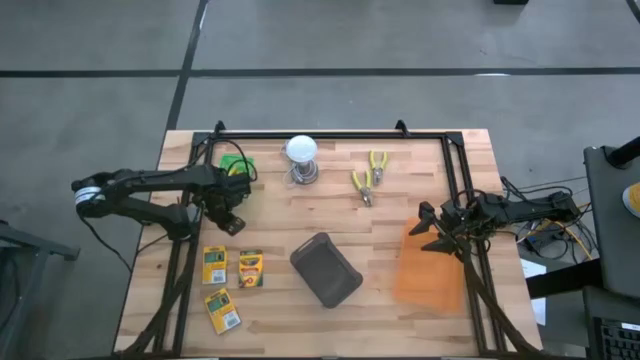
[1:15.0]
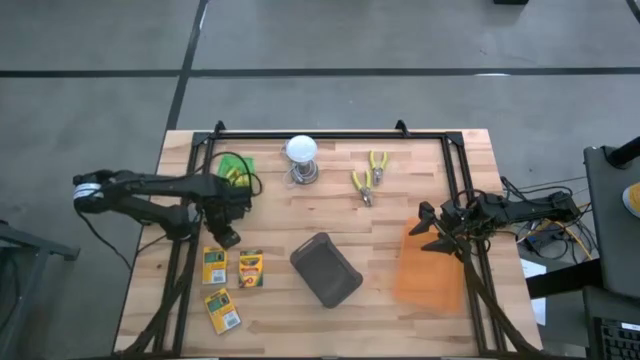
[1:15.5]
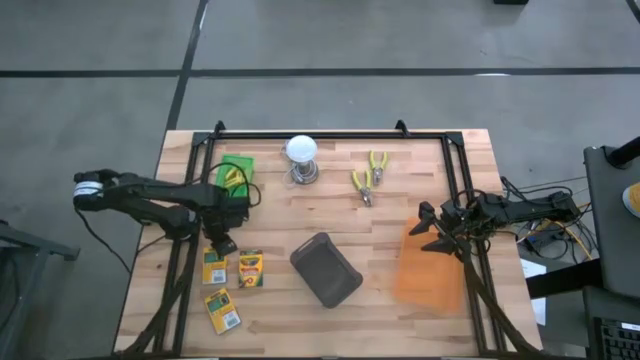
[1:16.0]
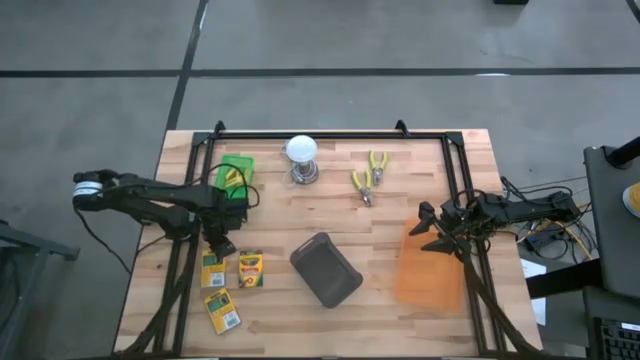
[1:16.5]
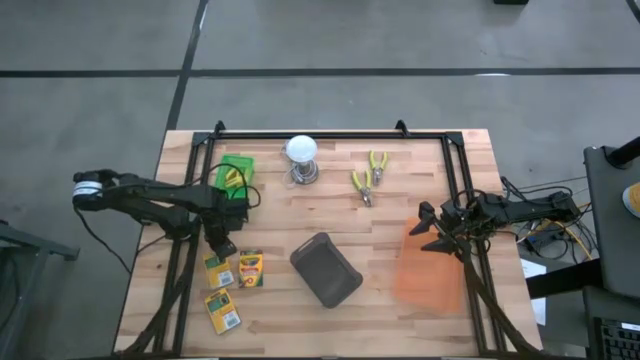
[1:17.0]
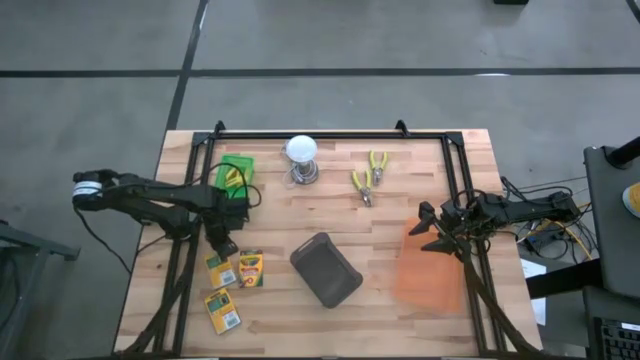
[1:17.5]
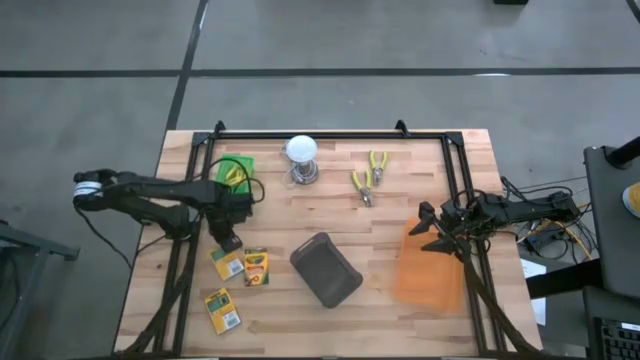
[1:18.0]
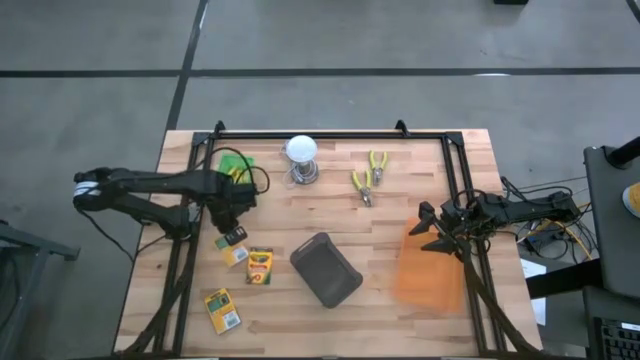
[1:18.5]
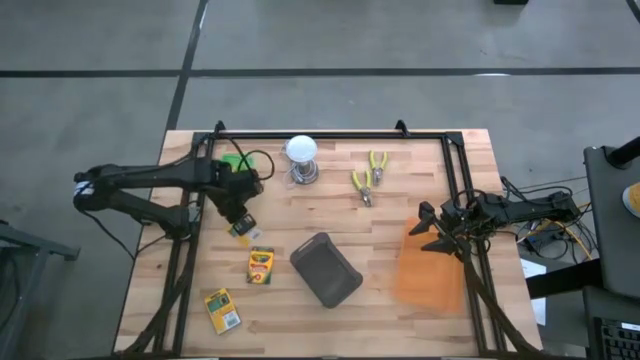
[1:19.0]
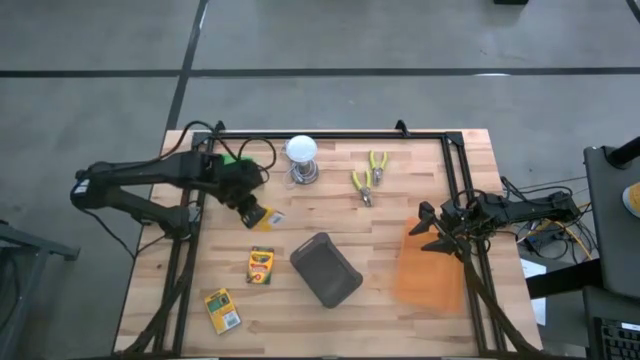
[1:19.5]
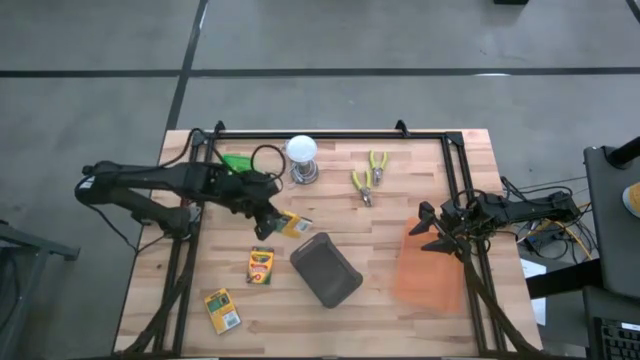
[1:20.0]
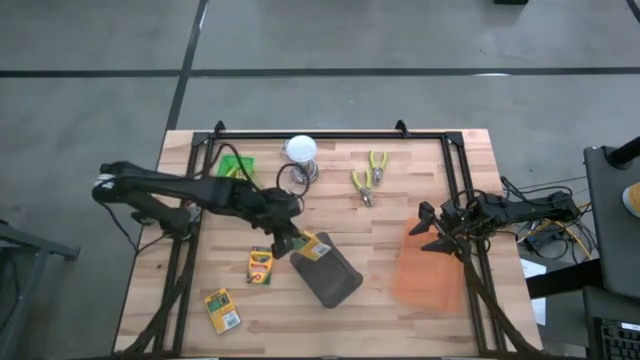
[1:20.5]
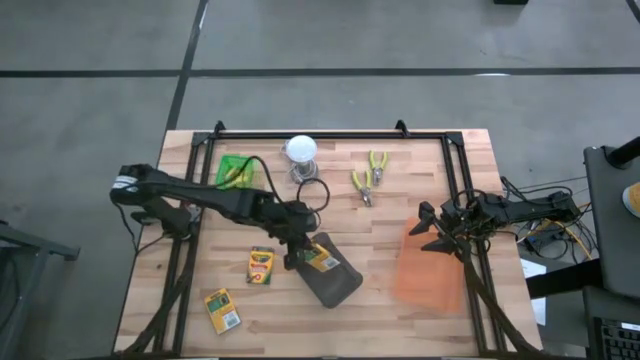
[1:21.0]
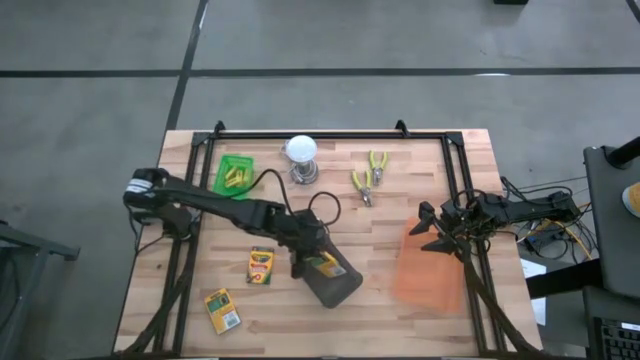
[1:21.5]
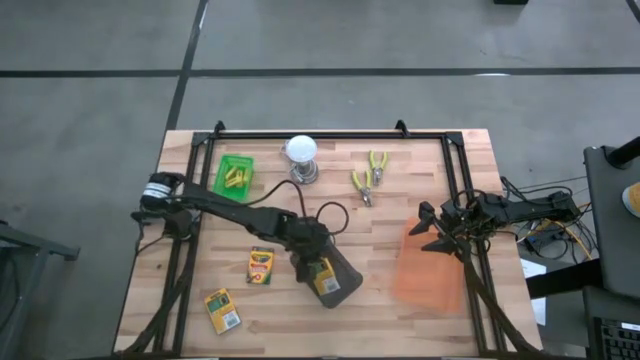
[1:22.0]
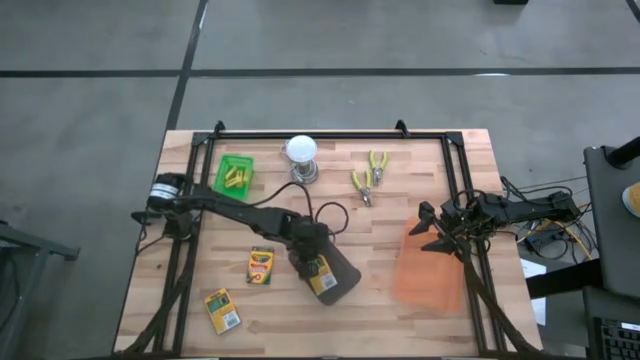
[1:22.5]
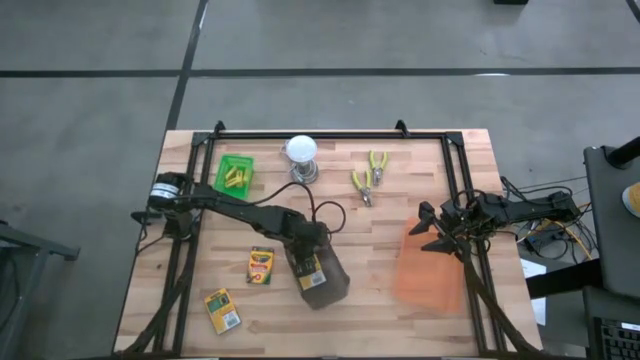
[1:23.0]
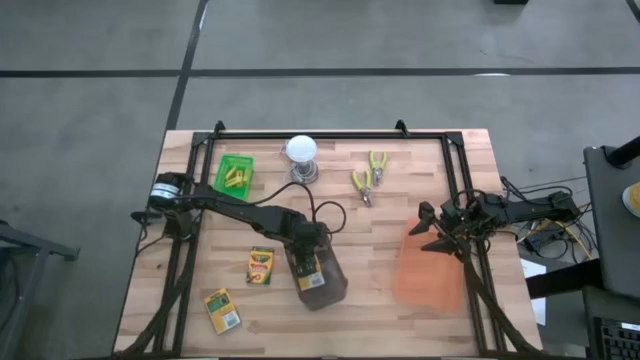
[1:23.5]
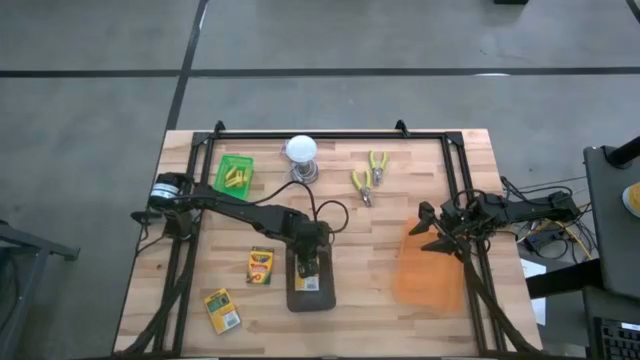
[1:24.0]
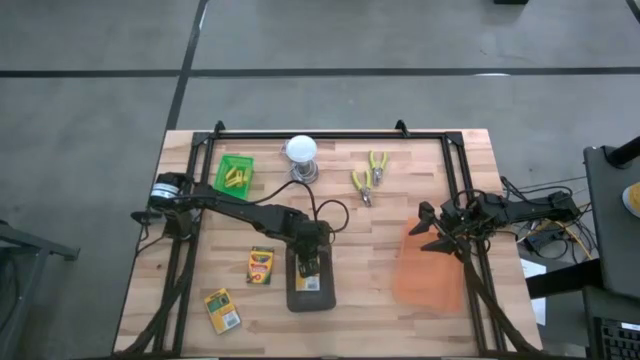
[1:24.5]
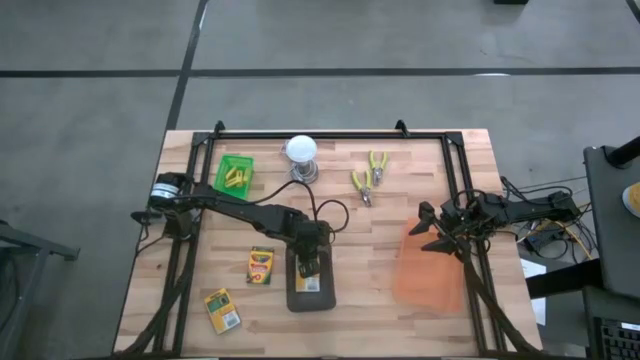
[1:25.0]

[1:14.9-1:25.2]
Task: Pick & Place School Supplies
Put the yellow crayon box into the black bin

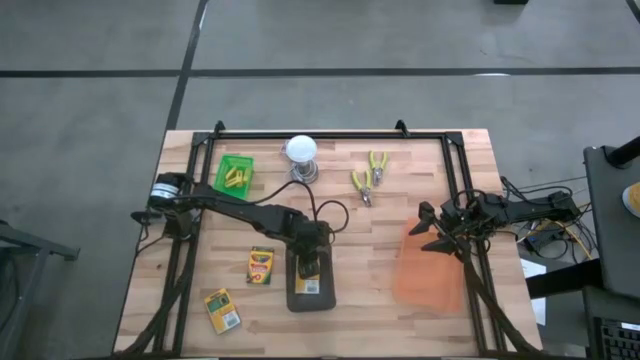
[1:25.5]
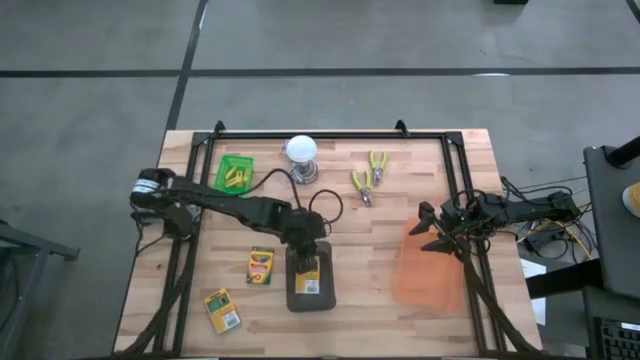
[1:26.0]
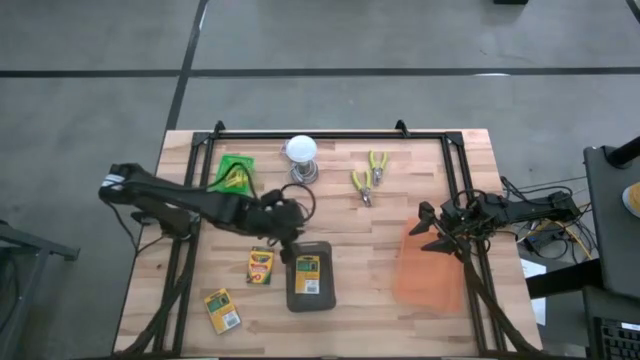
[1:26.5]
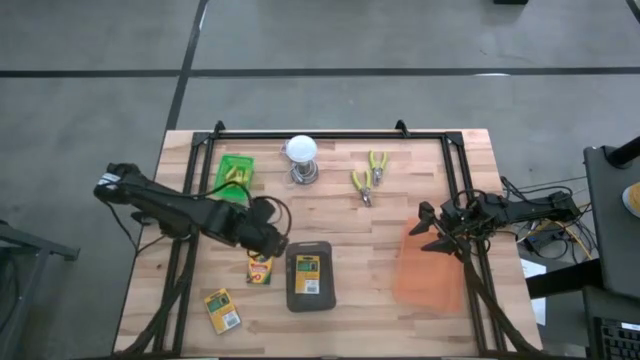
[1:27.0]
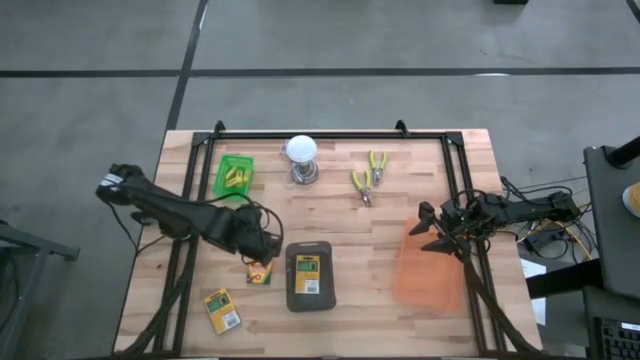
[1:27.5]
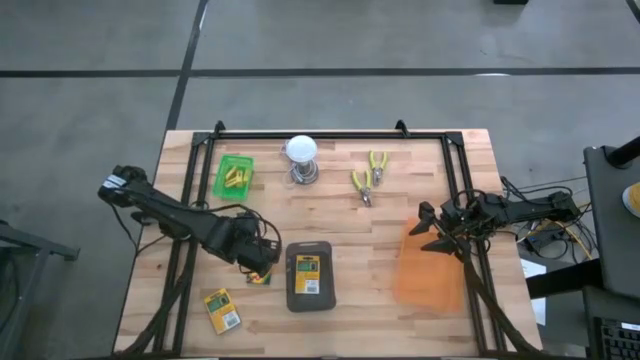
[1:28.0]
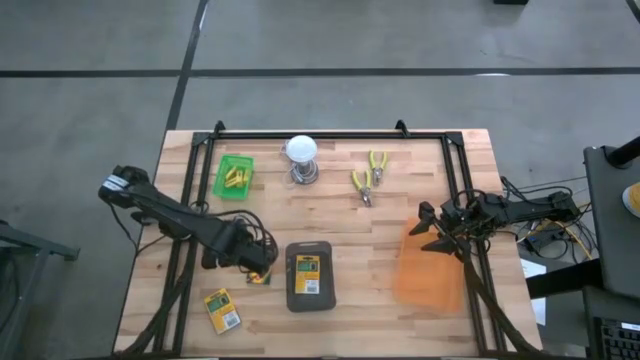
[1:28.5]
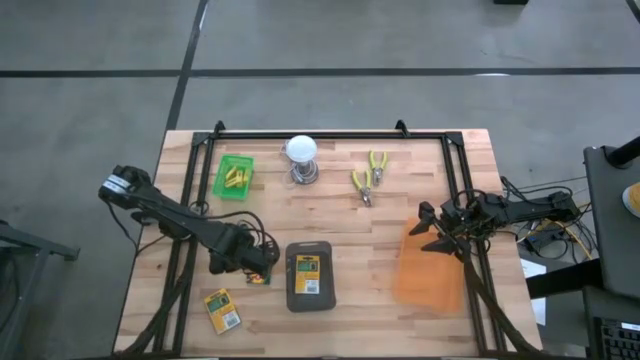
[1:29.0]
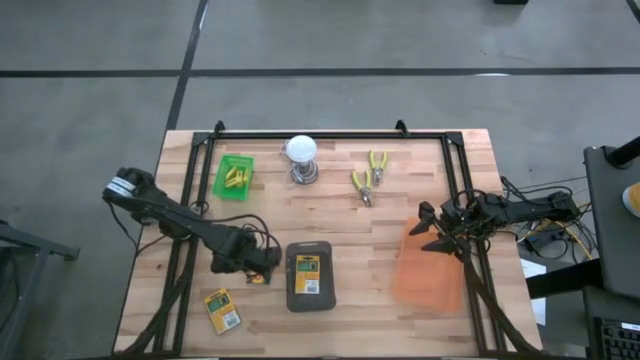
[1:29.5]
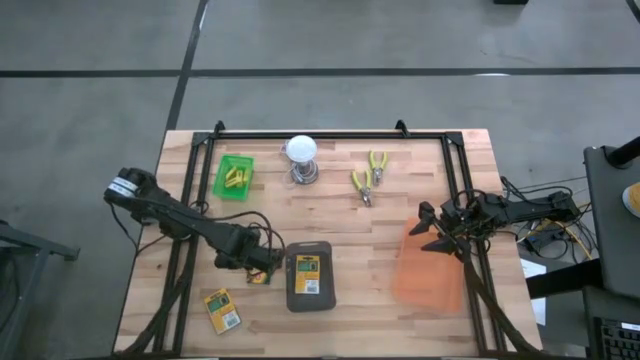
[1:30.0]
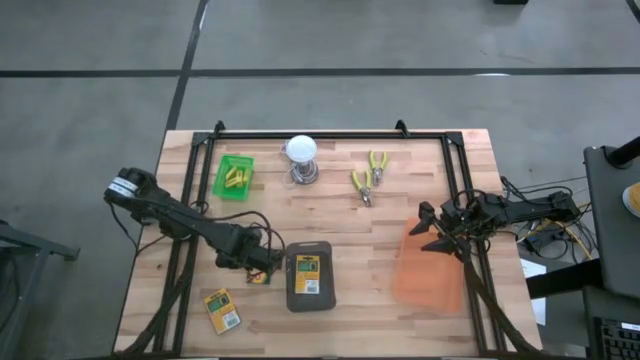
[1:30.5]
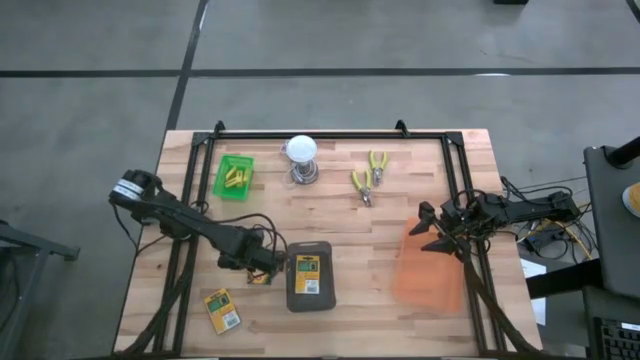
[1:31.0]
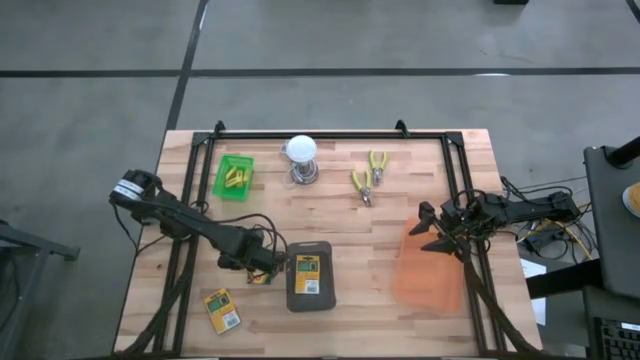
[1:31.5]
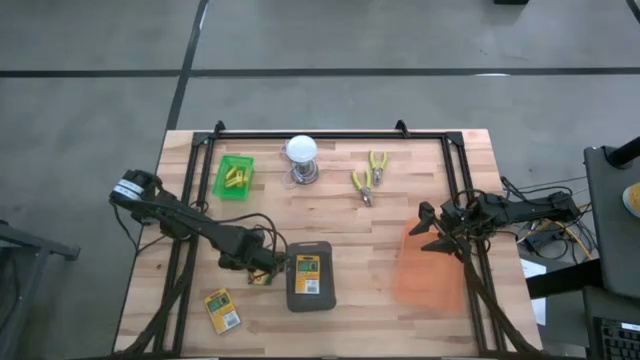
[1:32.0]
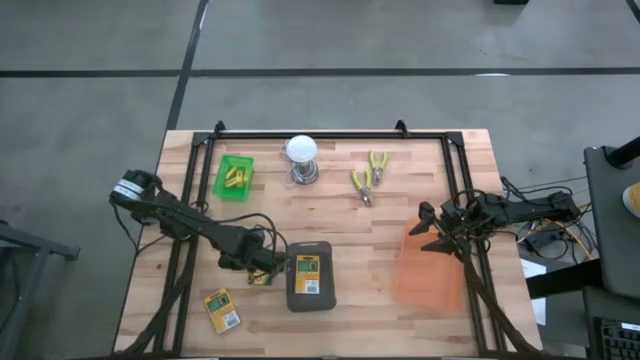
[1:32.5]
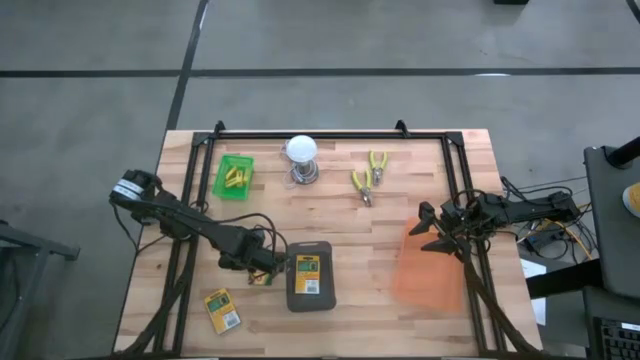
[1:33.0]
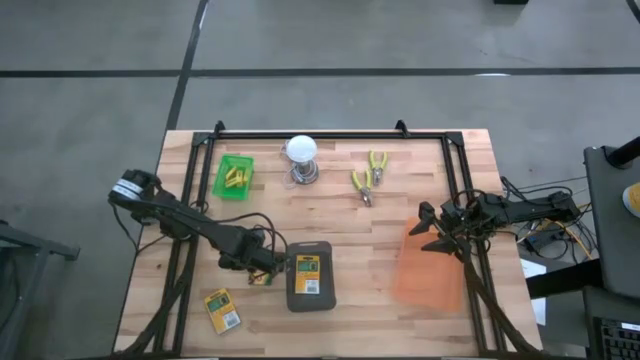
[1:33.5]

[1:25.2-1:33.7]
Put the yellow crayon box into the black bin

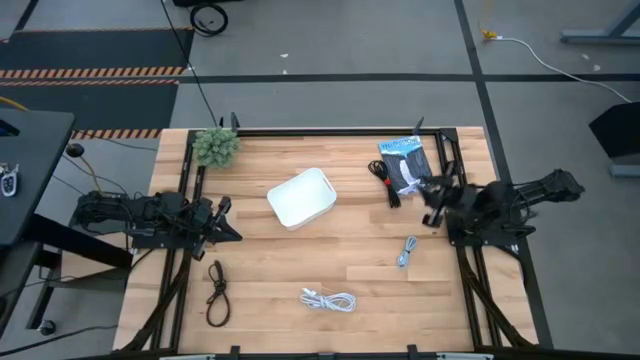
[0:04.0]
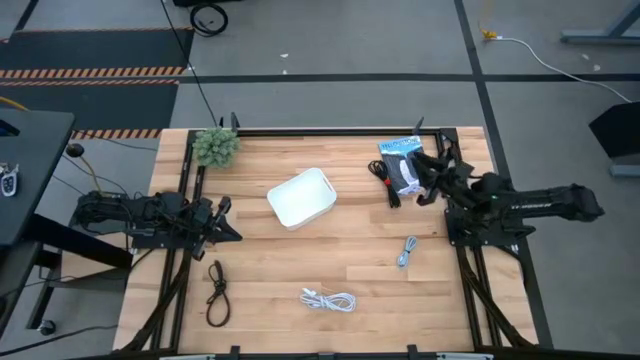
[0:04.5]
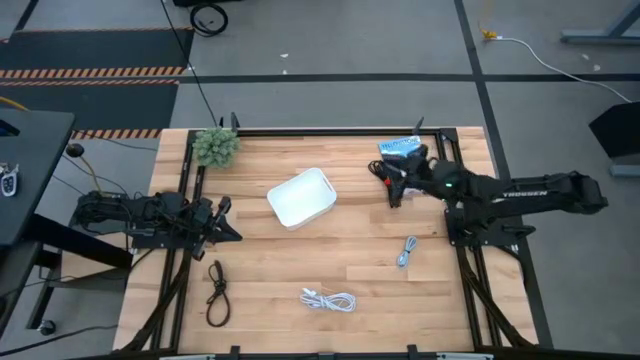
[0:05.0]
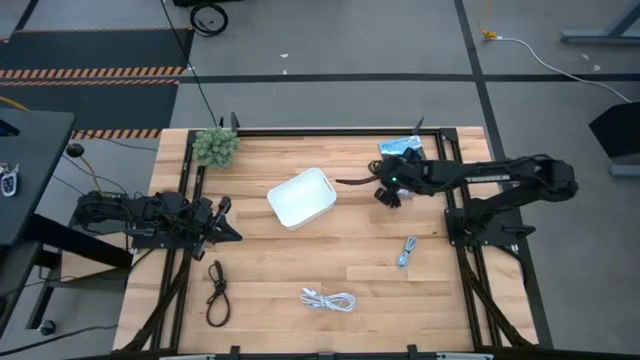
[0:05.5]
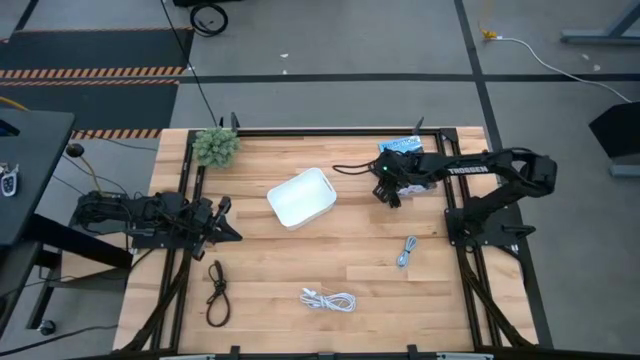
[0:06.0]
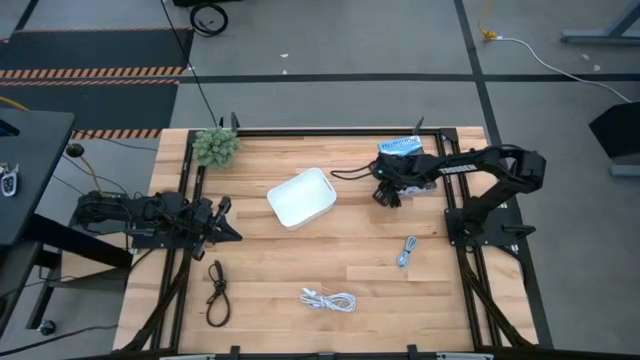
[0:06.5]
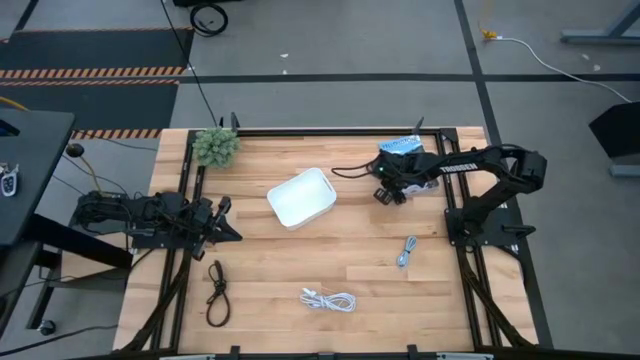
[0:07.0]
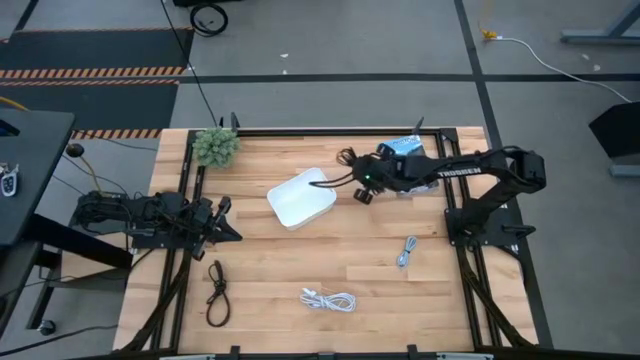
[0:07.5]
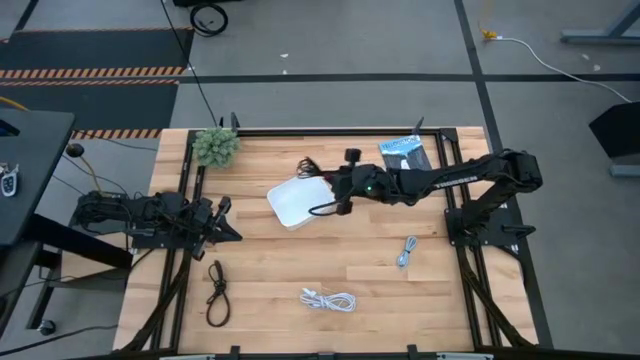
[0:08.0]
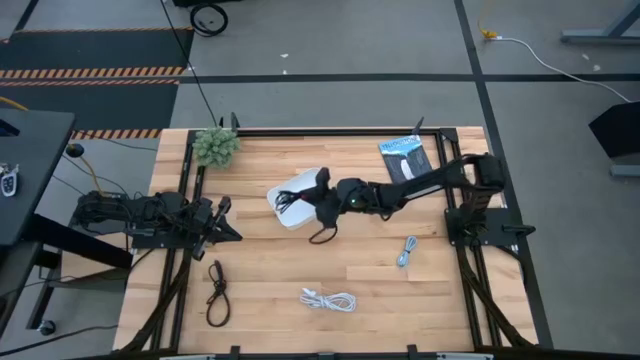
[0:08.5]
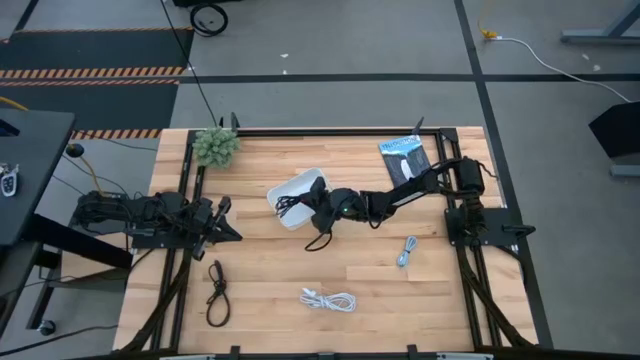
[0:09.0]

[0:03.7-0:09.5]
Task: Pick and place USB-C Cables
Put the top black cable charger into the bin white bin
